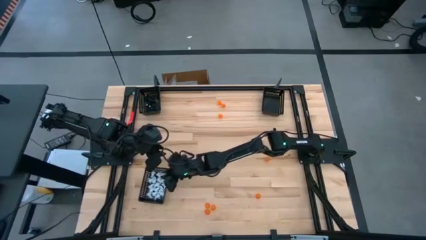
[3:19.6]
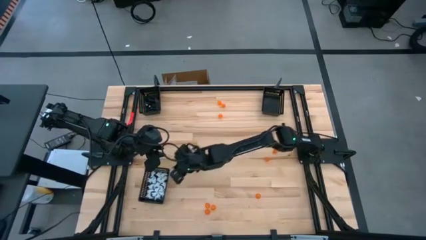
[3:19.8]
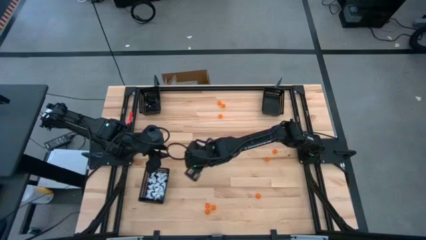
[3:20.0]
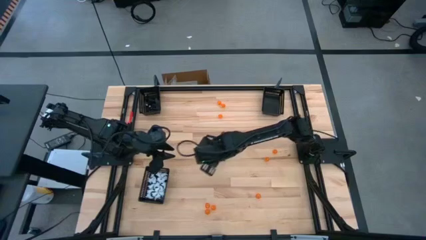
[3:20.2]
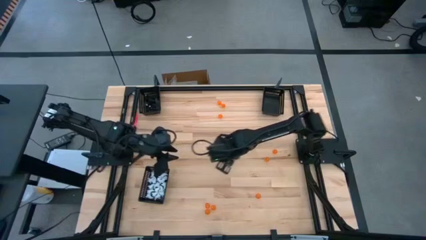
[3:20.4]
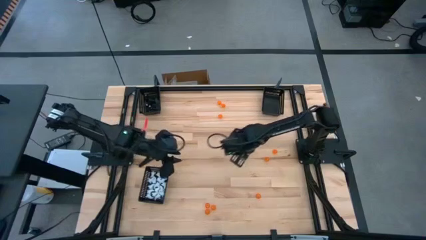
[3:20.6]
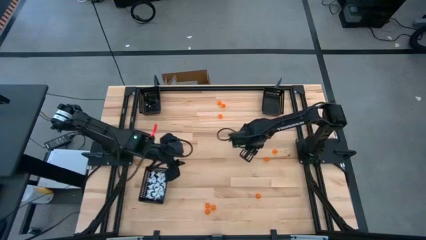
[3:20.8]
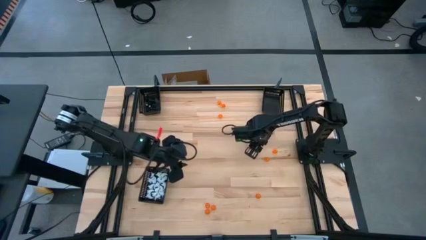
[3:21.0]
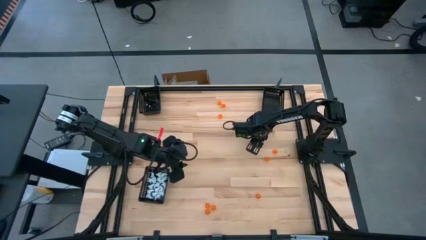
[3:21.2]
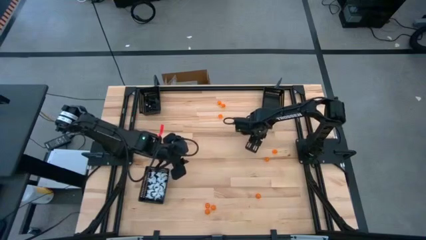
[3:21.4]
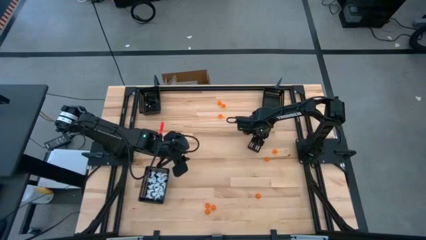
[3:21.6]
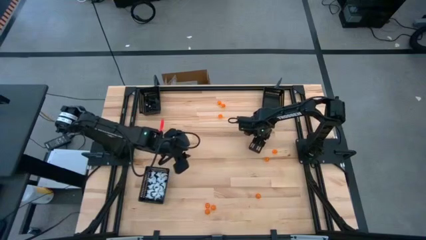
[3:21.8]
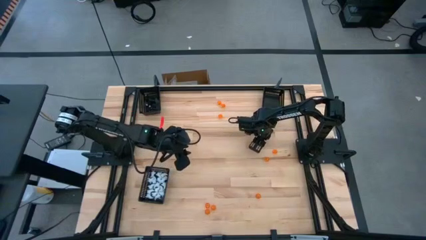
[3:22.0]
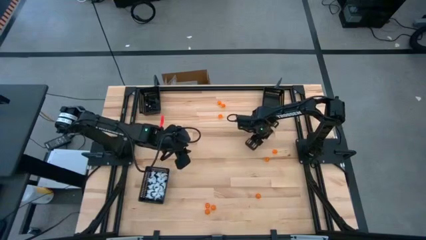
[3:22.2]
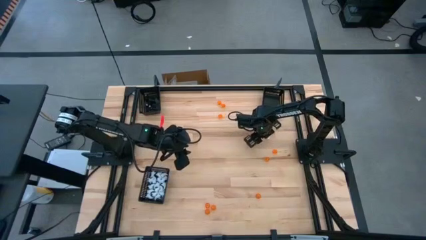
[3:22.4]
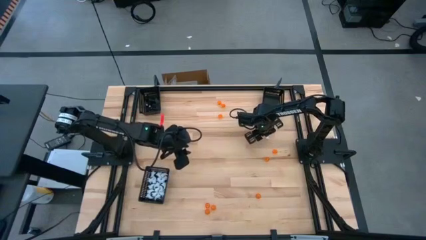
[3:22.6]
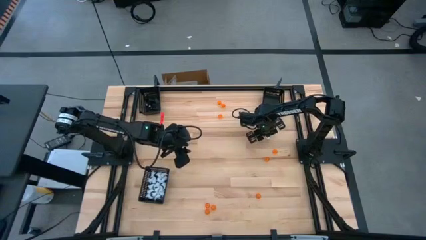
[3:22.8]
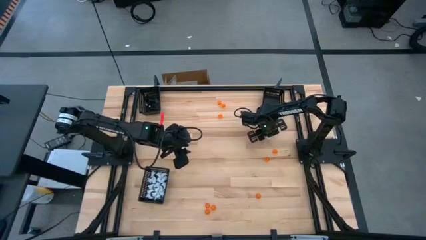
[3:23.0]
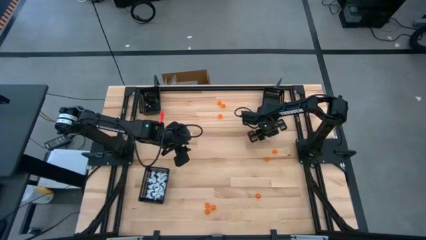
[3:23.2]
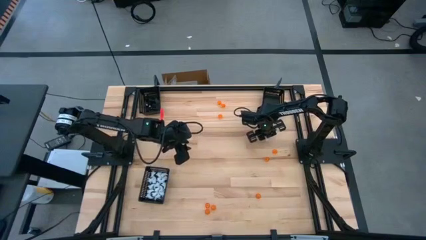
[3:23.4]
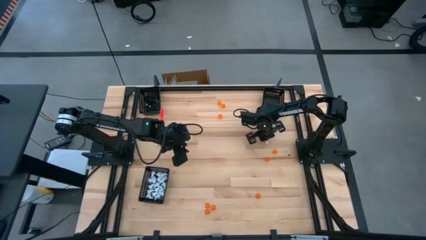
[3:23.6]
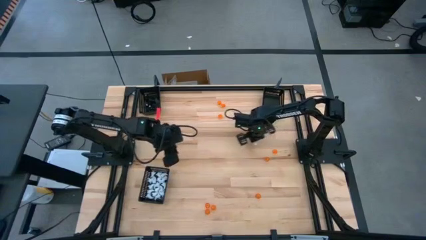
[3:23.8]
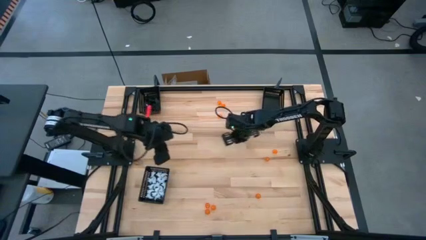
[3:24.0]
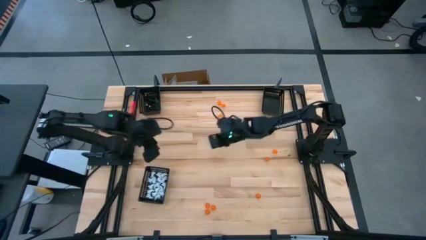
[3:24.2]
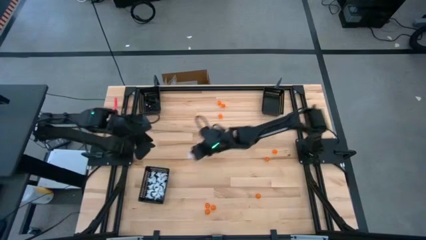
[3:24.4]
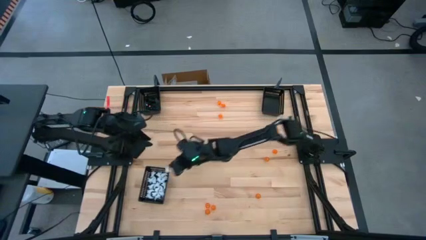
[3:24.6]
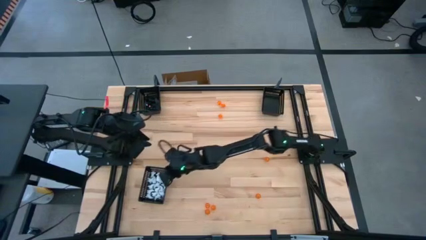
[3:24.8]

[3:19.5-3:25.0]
Task: Sort Halloween decoration
Put the white ghost toy into the bottom black basket

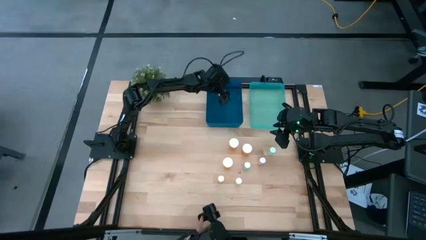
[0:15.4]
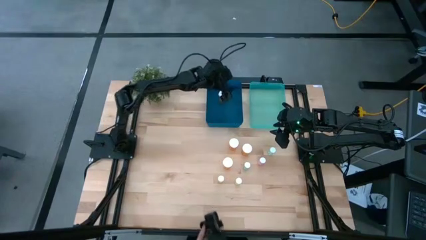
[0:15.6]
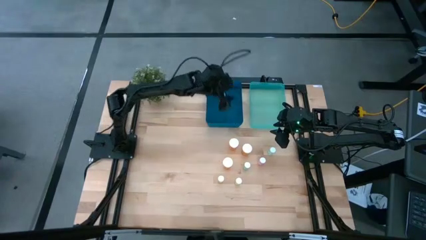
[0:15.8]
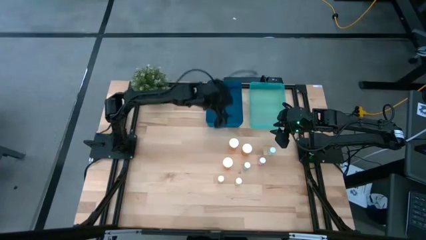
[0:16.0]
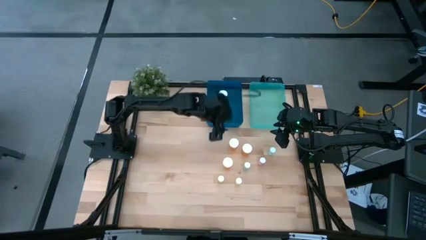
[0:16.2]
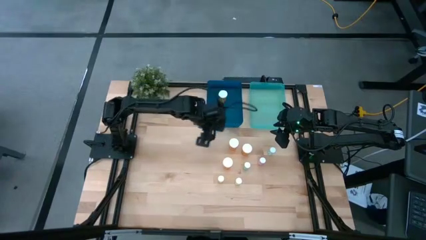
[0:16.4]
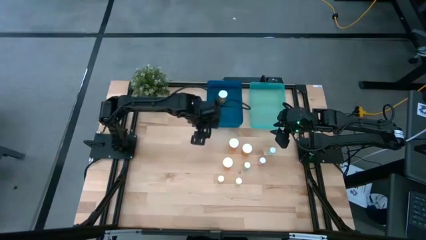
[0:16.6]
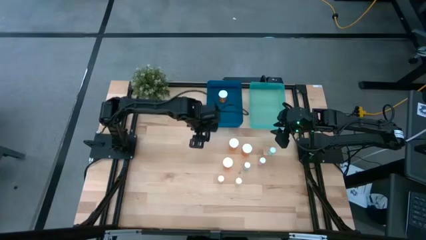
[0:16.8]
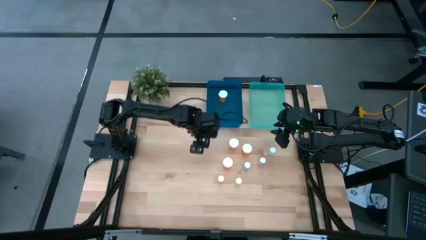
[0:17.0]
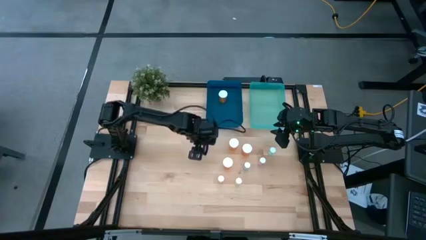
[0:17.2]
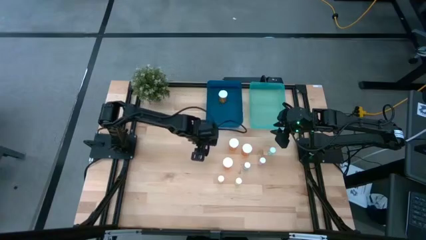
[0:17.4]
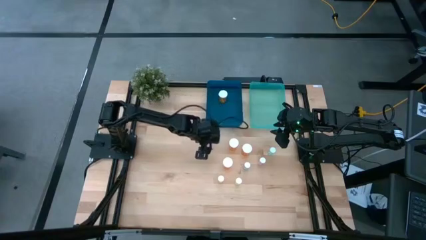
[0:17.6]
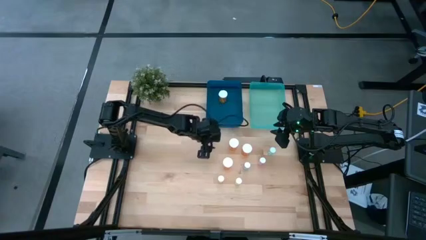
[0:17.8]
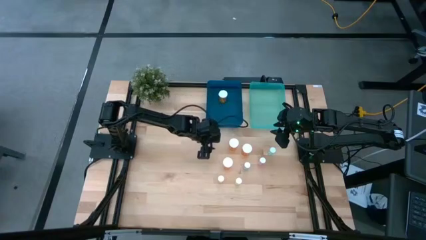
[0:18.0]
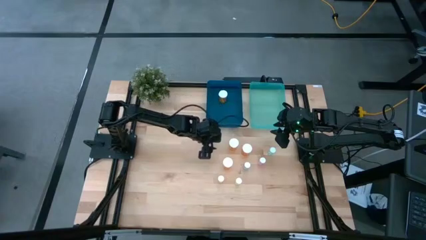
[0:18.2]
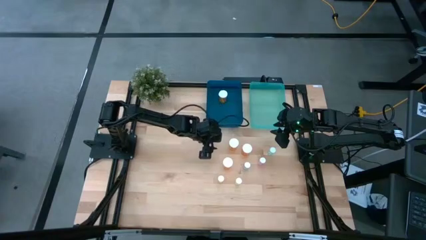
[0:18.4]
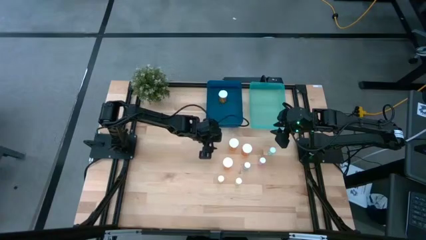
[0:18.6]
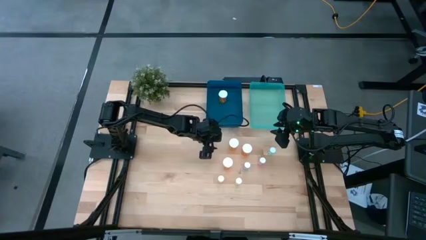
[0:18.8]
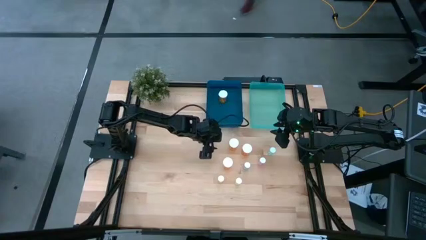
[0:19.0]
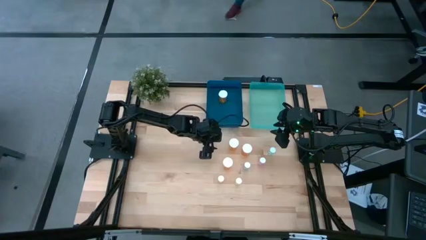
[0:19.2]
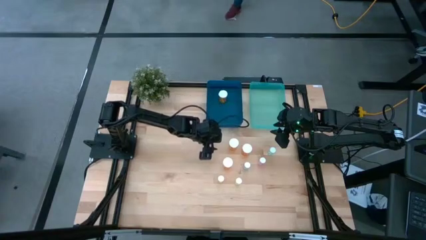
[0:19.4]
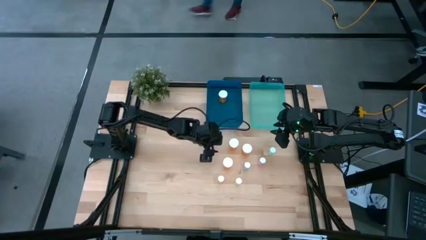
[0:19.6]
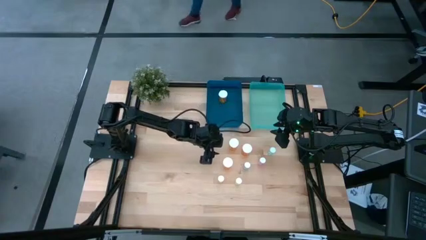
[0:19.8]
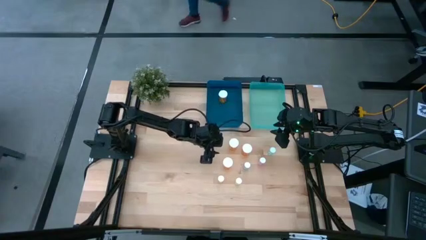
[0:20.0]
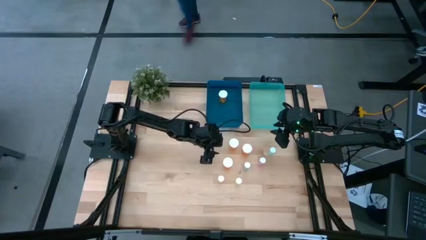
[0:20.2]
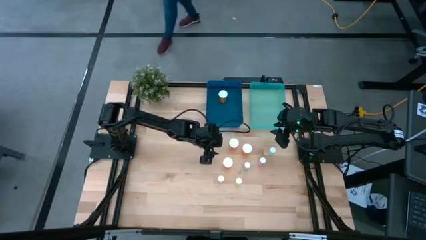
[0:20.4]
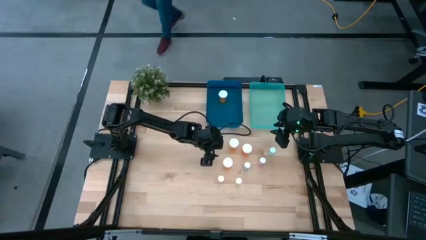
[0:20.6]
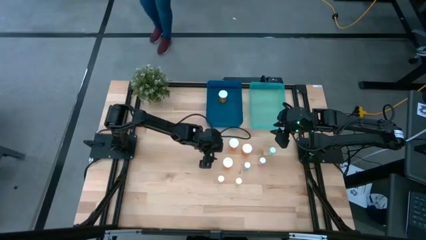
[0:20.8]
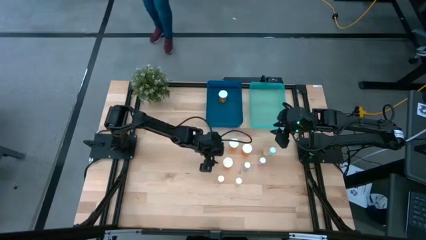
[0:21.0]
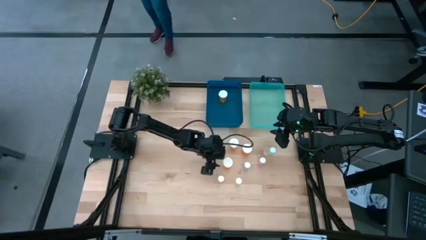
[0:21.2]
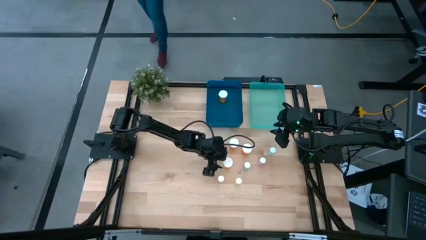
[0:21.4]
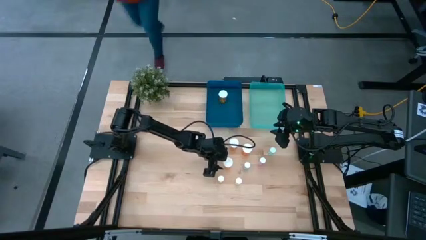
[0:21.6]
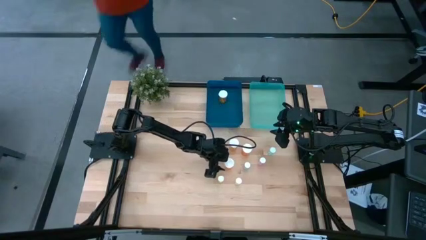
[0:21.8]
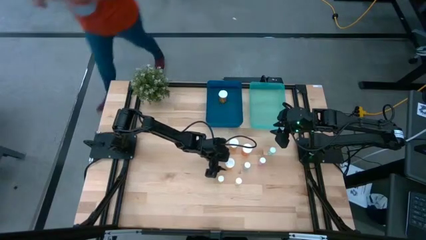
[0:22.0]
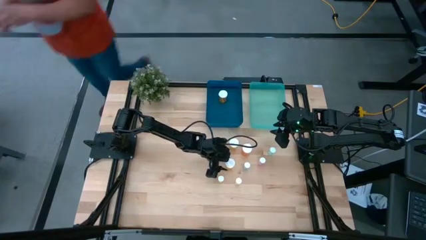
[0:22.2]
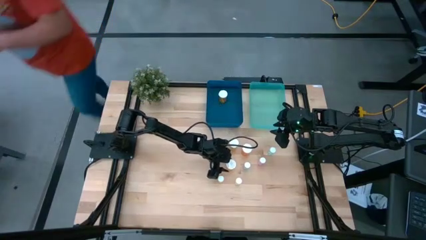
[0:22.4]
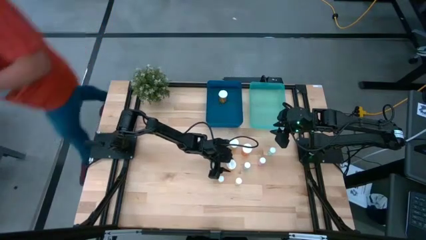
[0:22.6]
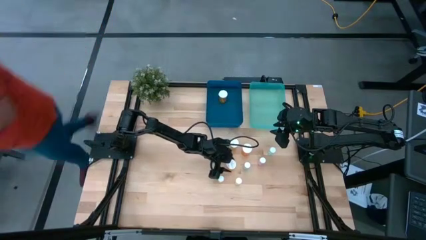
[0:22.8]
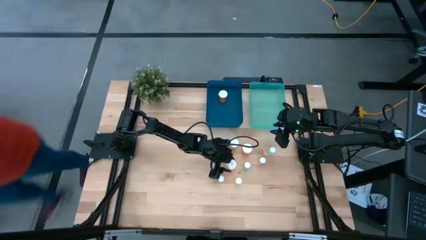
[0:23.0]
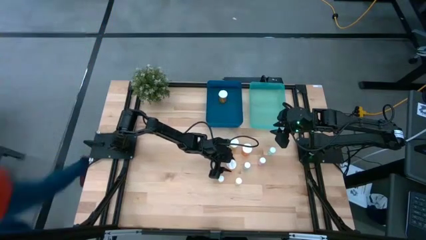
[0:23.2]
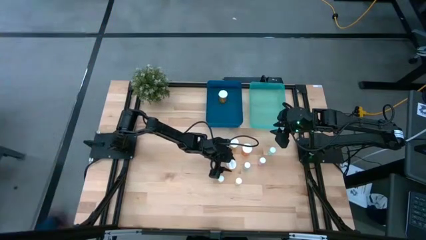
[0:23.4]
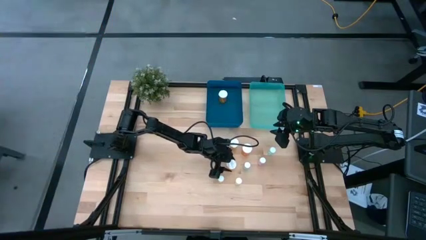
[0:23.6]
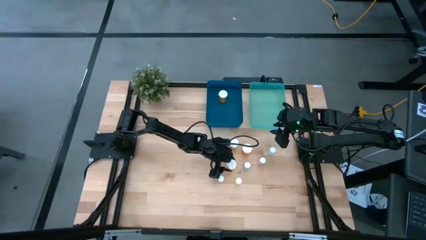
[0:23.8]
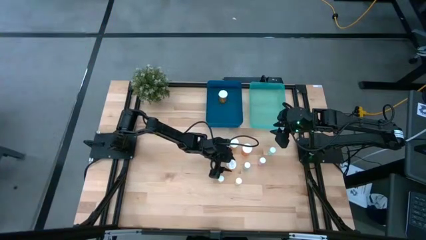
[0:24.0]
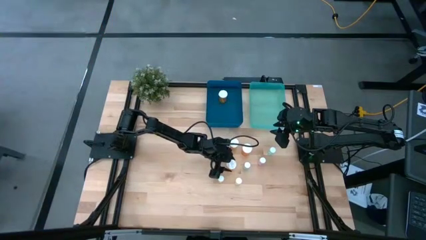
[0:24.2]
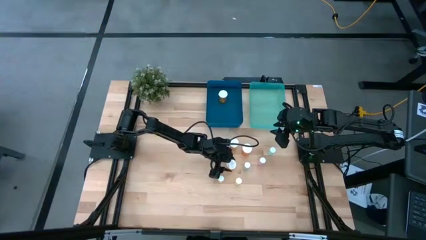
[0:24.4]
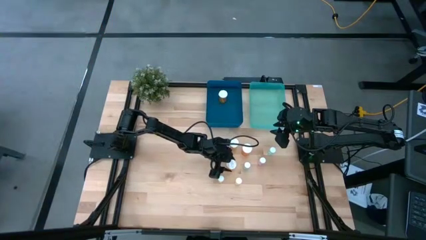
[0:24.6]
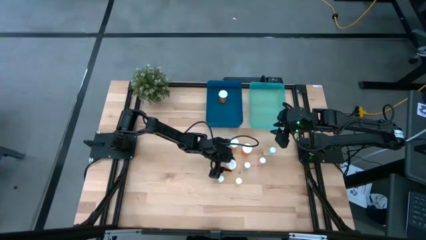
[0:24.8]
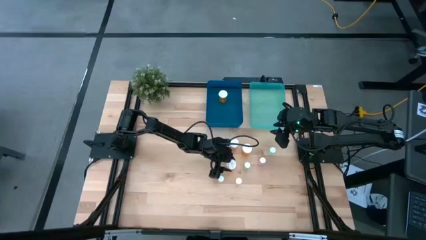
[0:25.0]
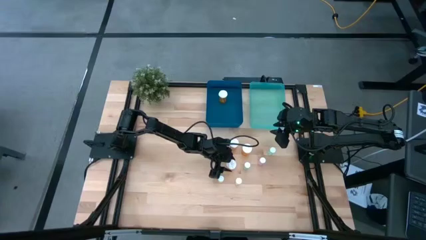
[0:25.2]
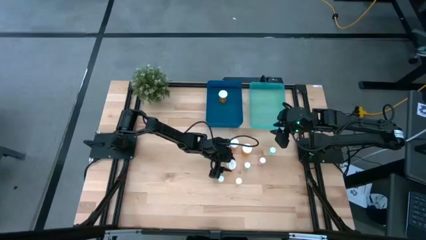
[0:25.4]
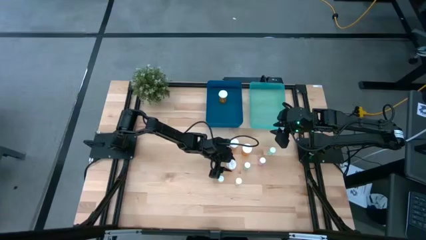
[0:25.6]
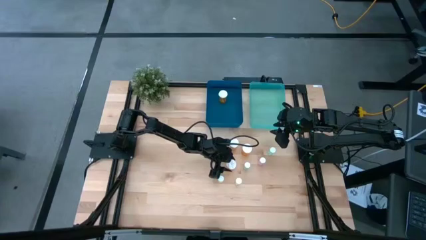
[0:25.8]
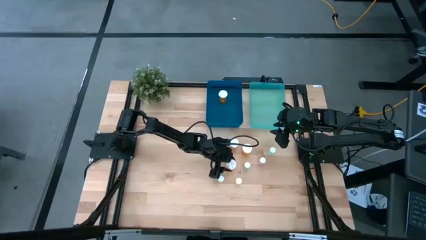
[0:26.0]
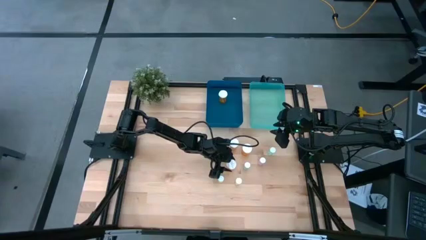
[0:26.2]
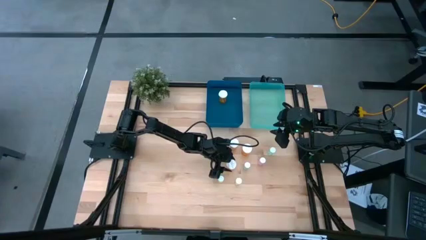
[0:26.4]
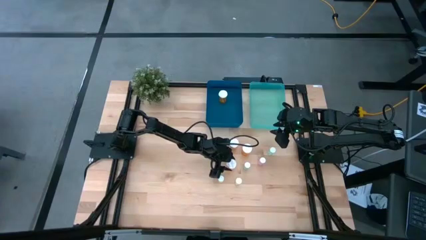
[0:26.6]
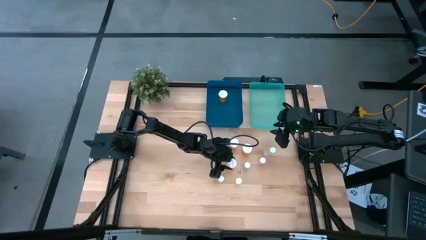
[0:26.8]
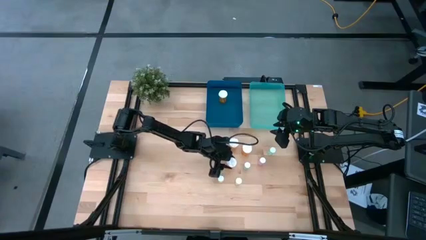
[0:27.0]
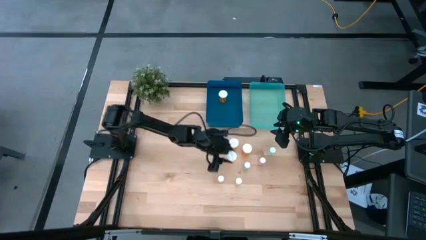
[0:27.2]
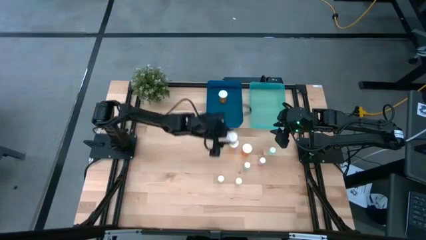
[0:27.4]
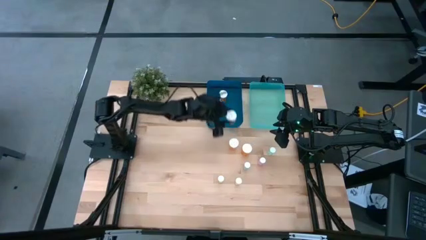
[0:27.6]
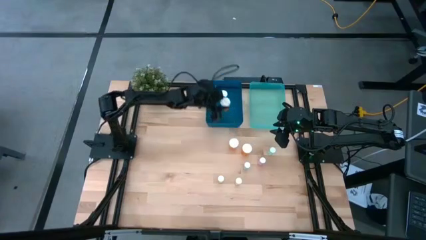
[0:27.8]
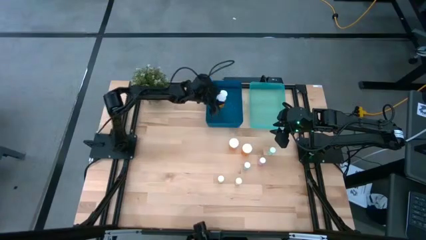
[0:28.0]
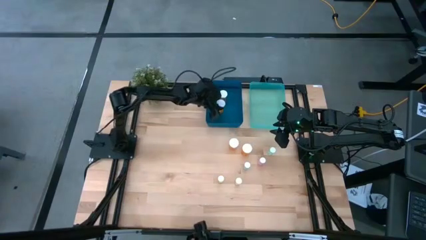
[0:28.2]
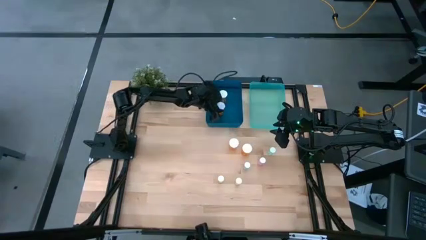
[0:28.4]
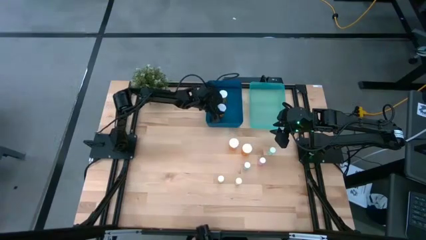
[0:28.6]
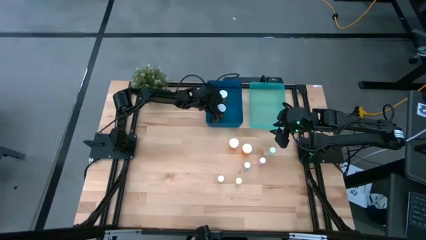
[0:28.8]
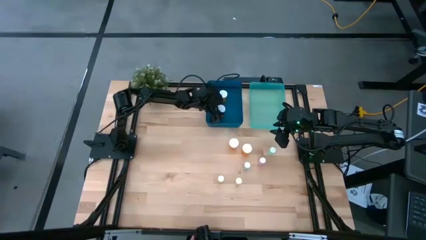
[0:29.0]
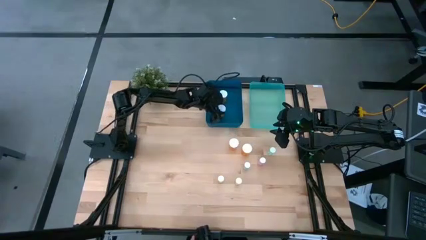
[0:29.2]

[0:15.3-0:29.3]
Task: Pick and place medicine bottles into bin by pill shape (circle, oval)
Put the large orange medicine bottle into the blue bin
